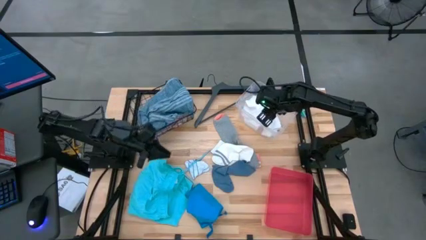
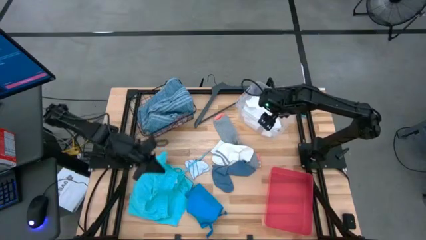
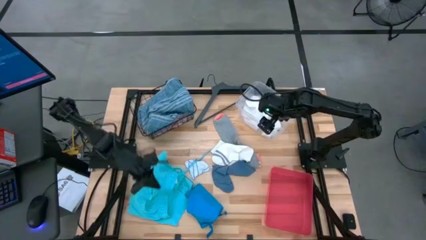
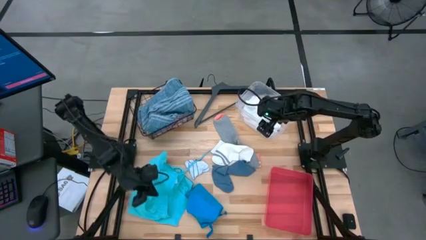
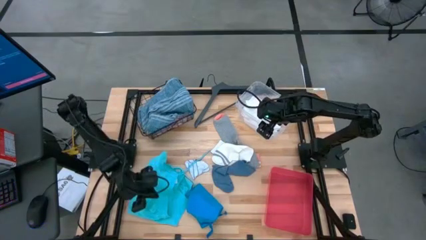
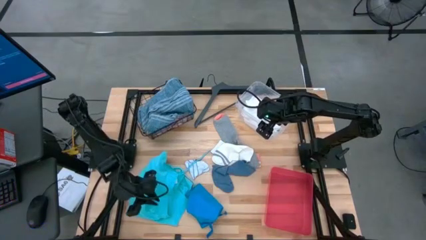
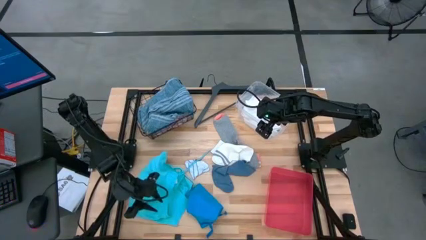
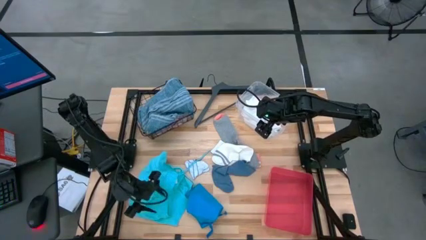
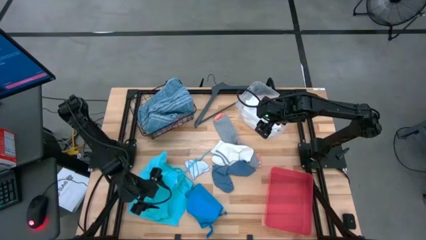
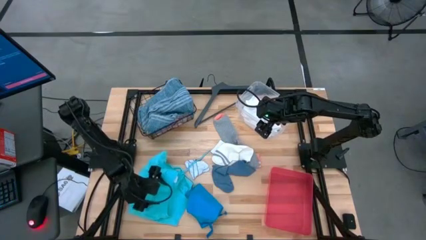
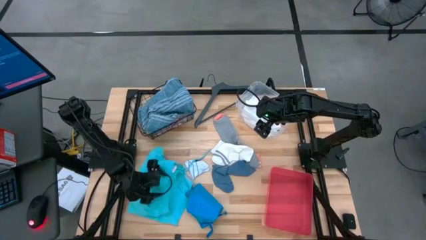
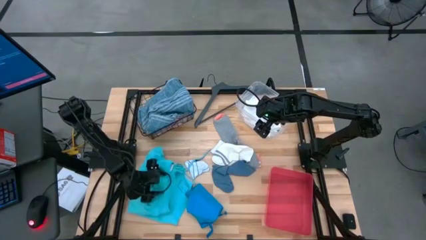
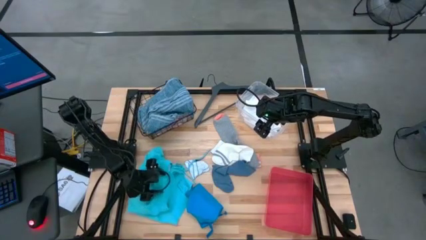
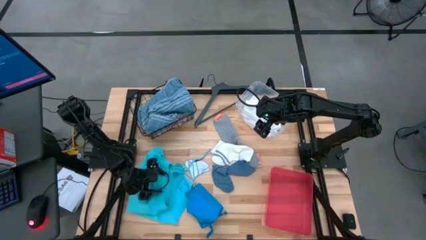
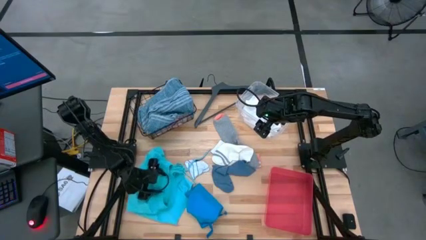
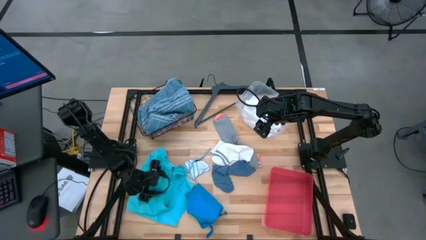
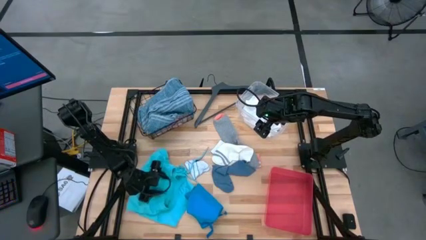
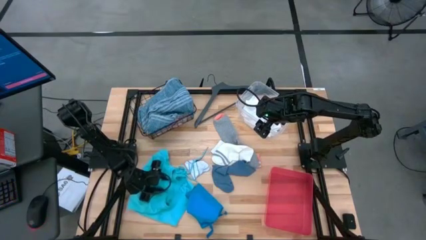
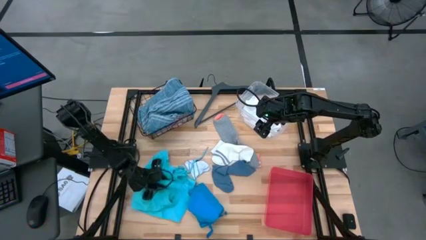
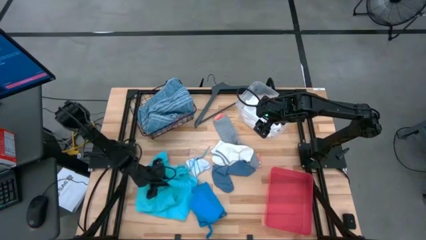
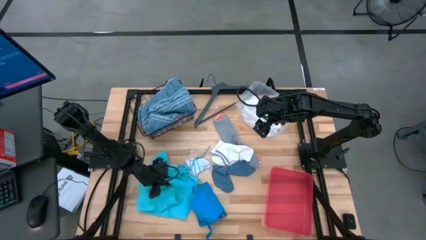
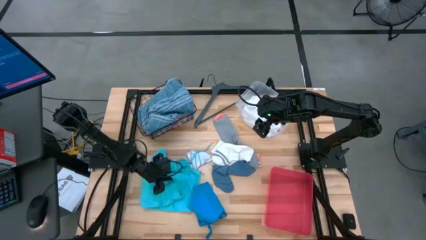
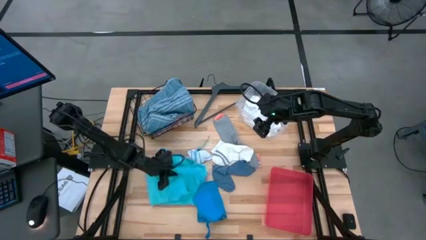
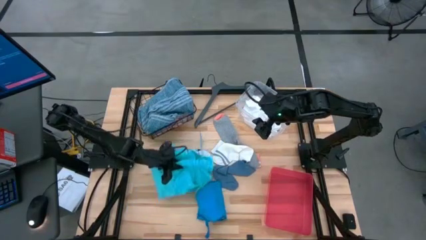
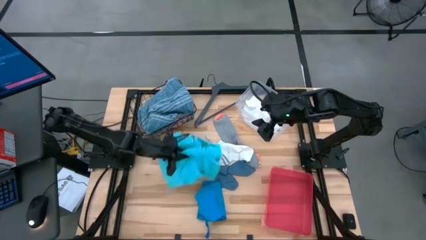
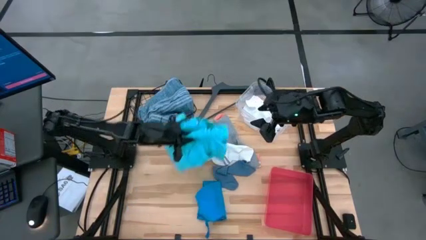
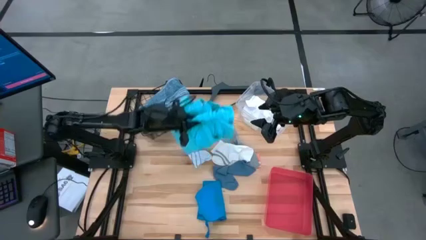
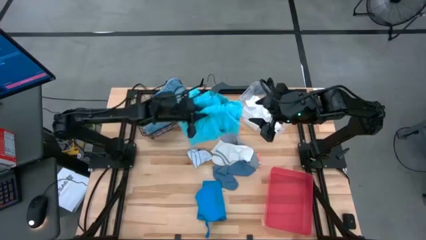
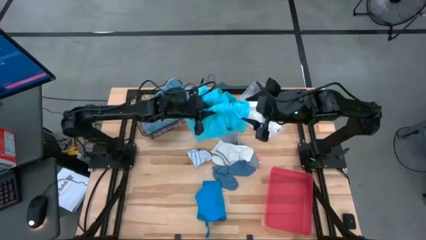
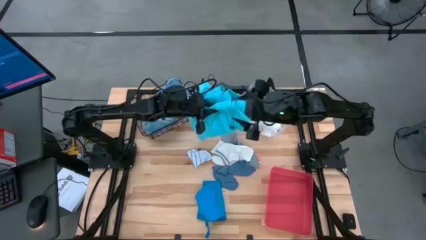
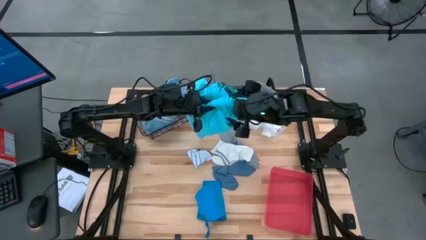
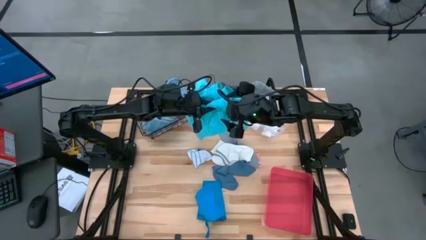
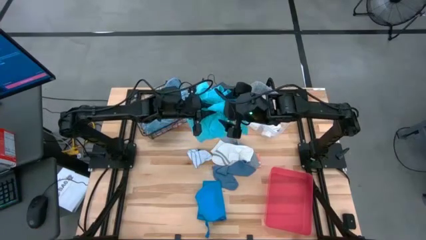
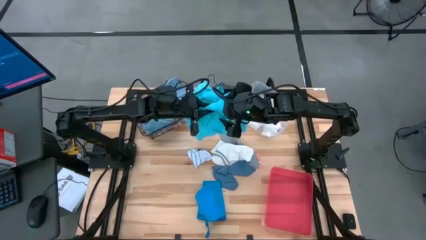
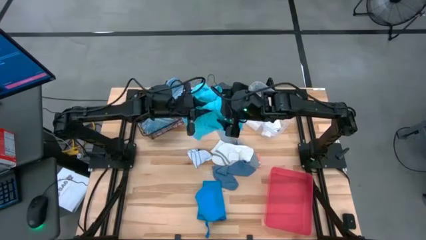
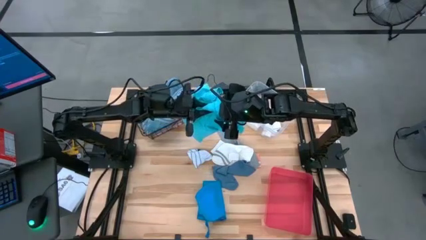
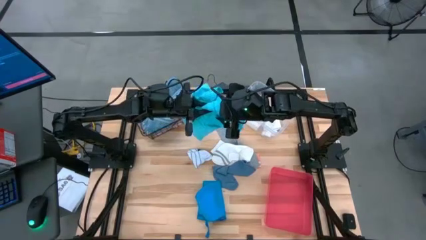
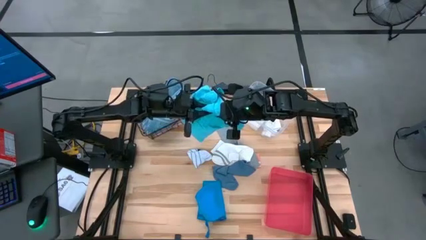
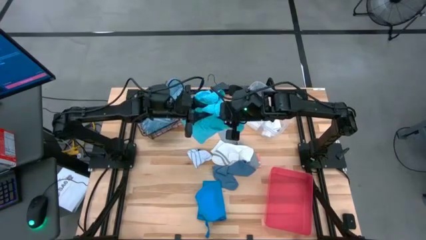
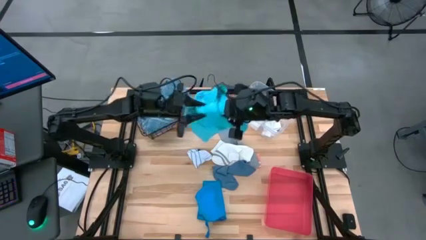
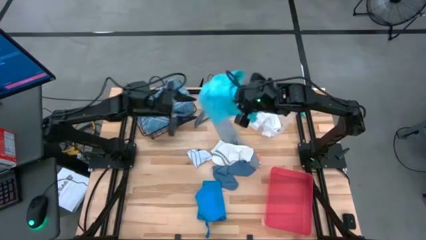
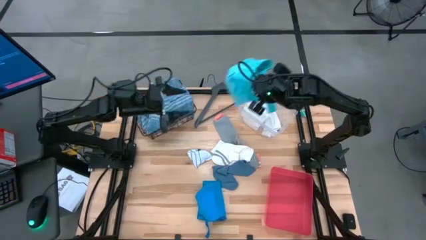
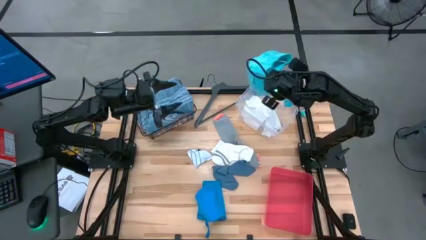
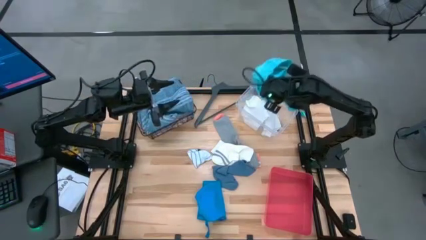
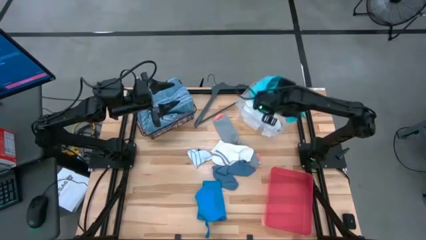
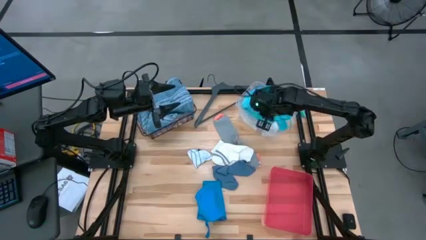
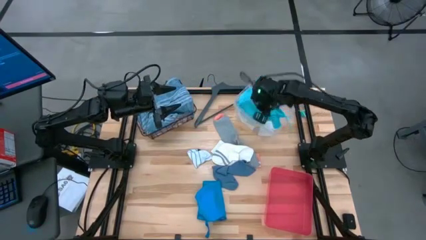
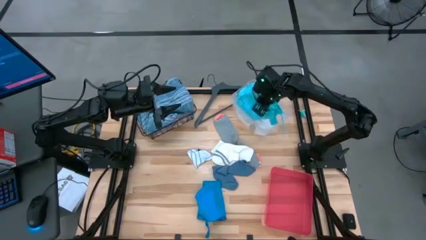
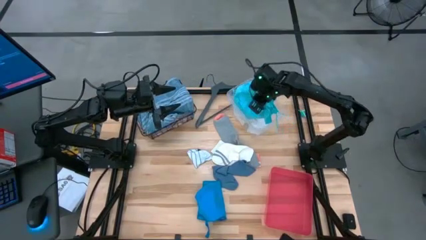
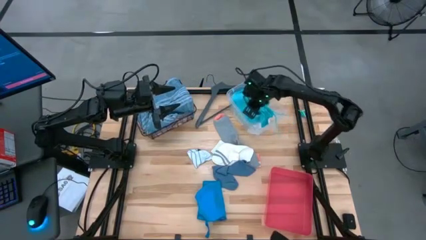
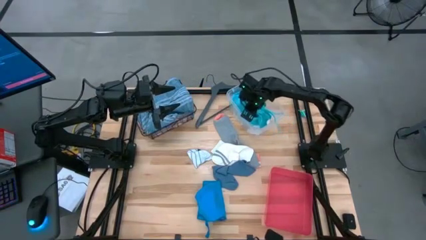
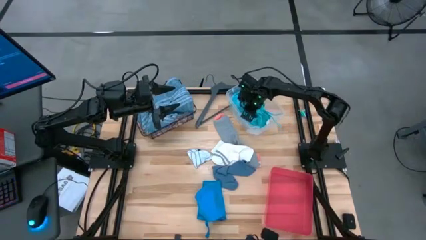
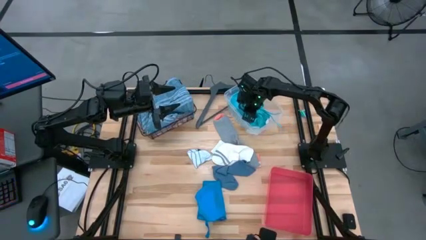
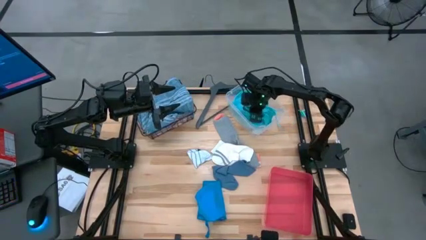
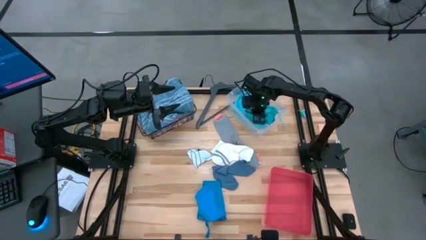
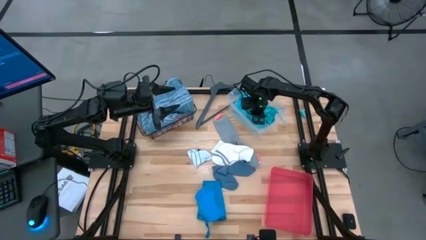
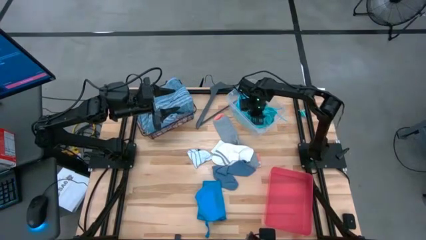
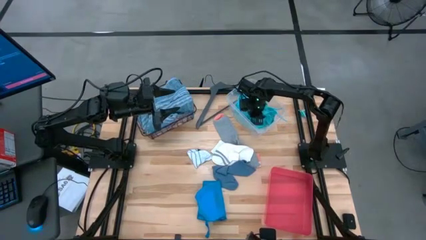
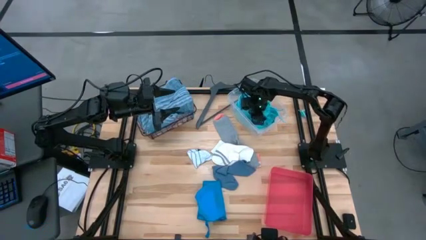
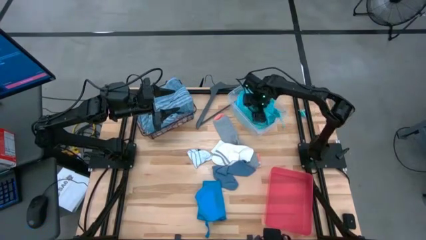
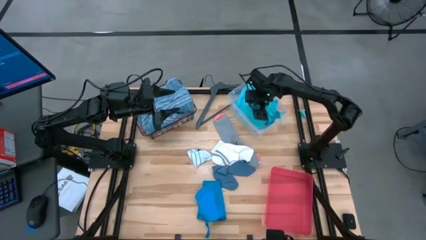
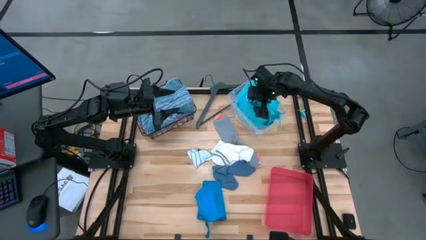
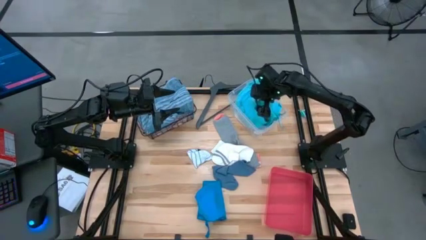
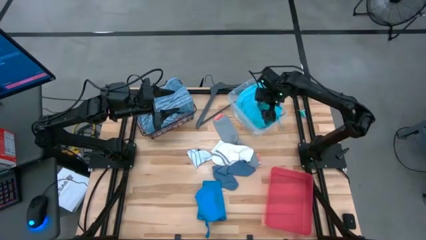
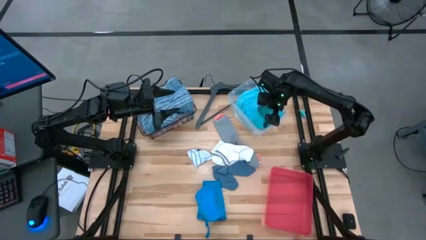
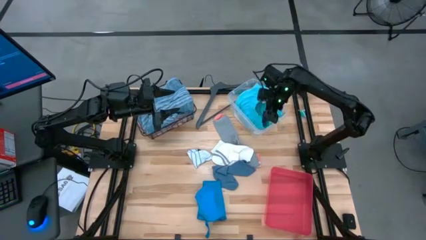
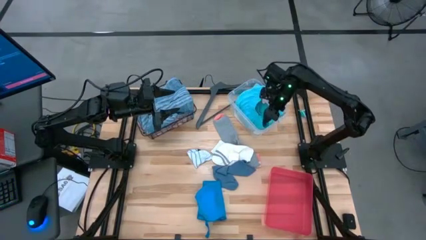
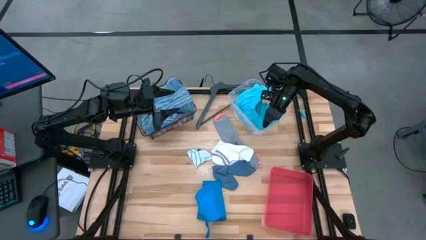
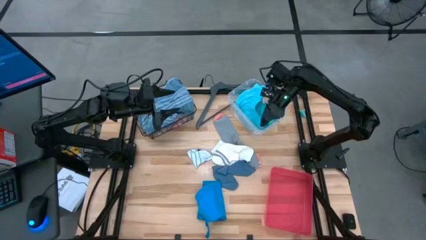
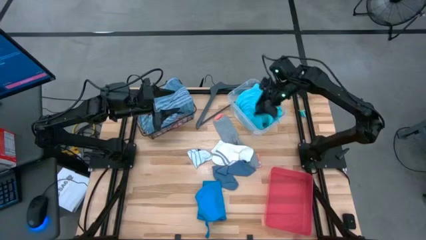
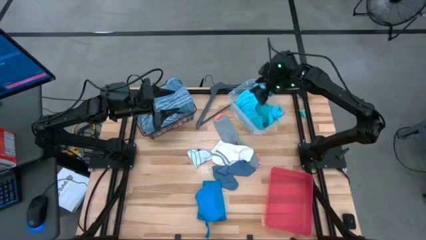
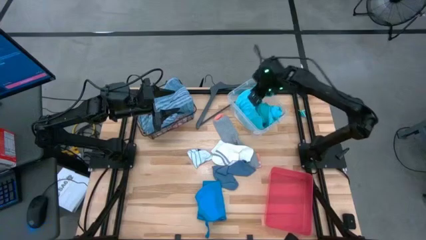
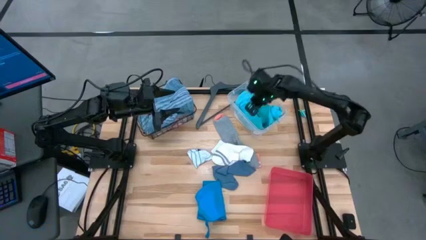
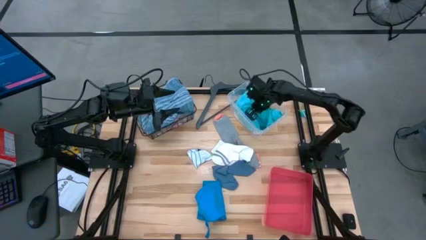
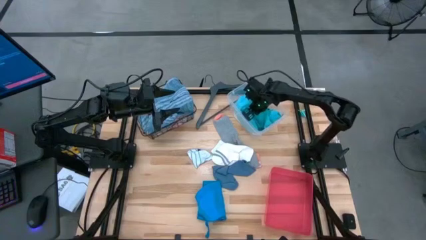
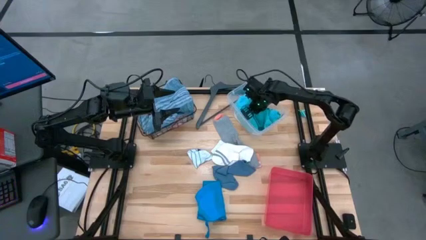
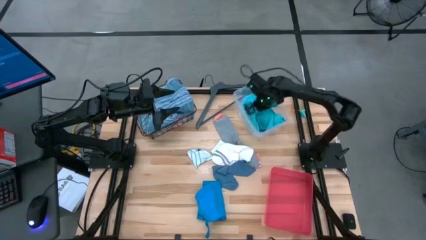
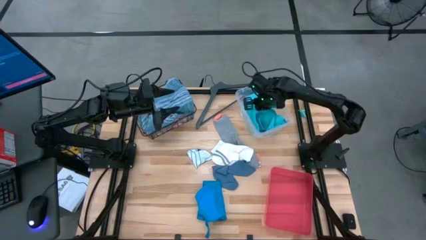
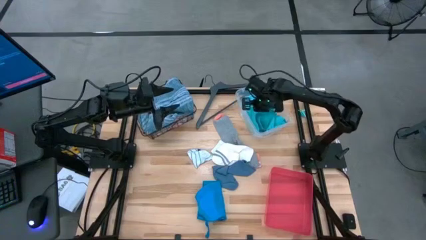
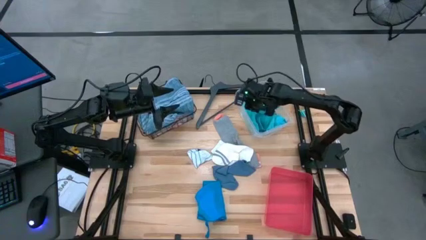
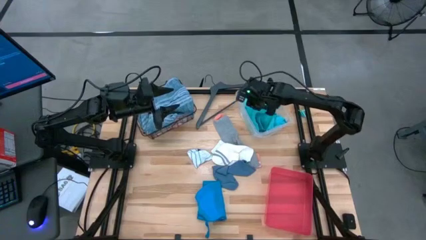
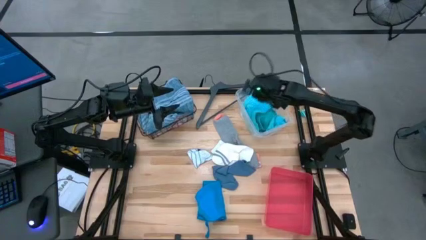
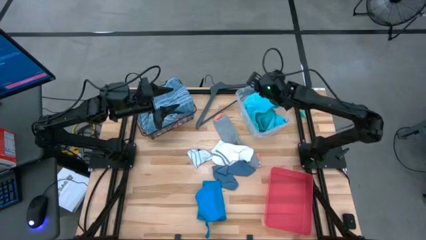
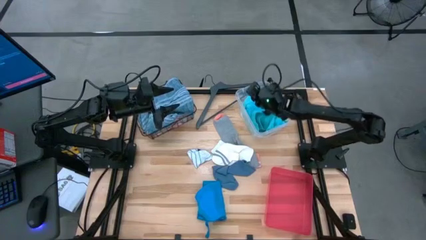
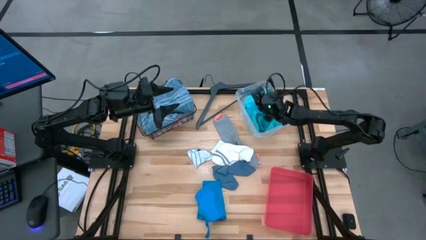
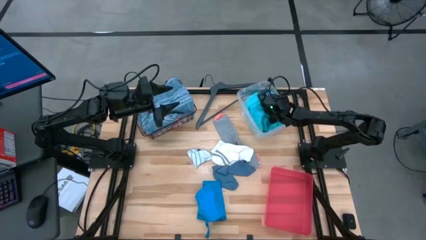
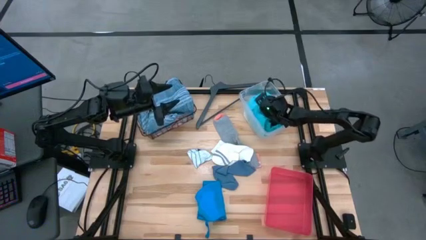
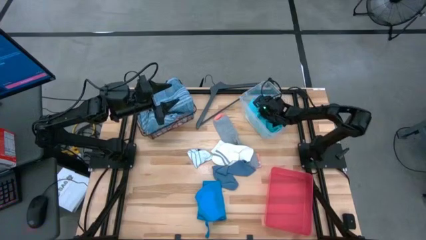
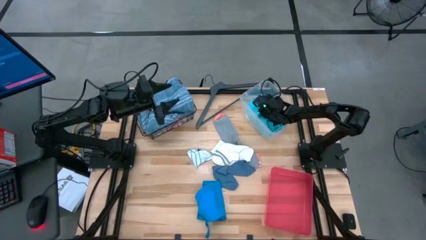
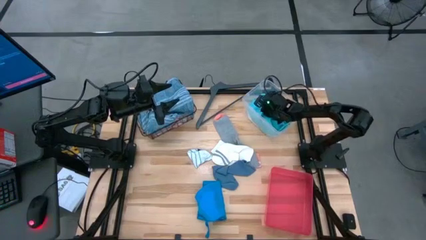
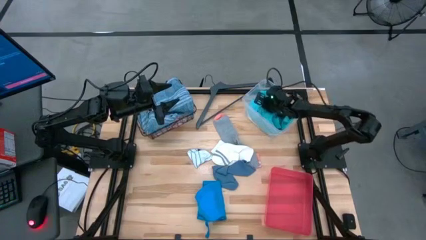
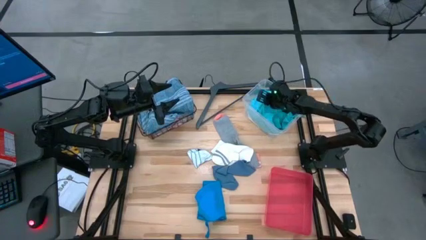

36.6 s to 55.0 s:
Task: Pick & Place Cloths
Put the light blue shorts into the transparent bin
